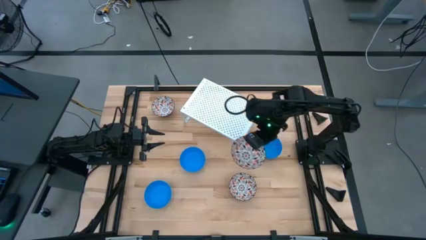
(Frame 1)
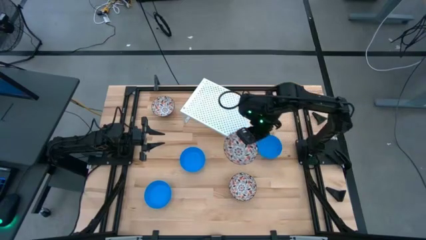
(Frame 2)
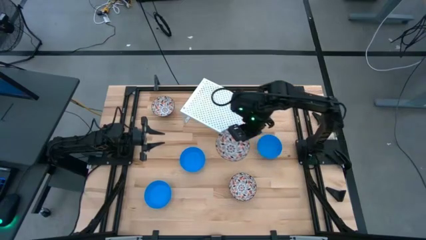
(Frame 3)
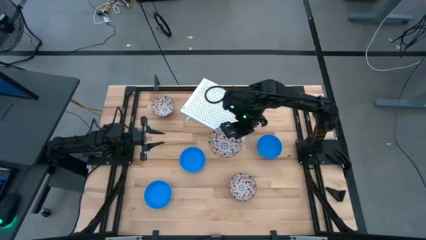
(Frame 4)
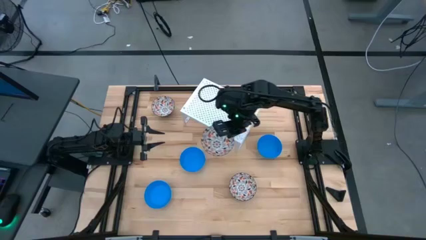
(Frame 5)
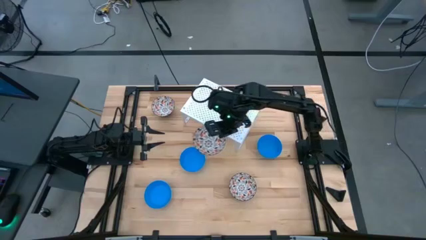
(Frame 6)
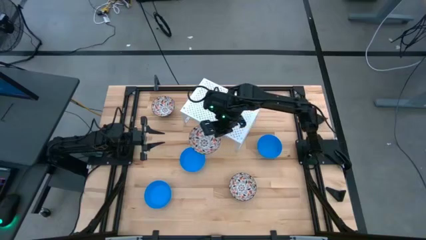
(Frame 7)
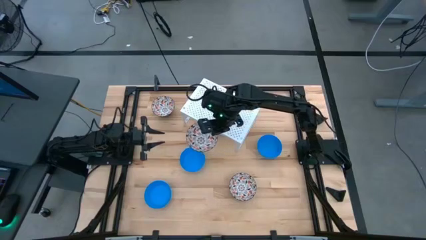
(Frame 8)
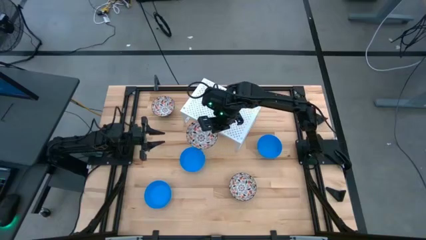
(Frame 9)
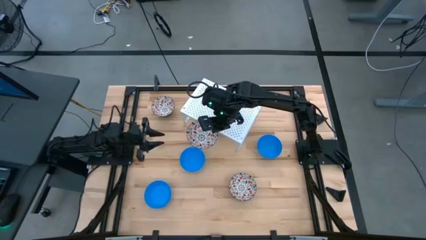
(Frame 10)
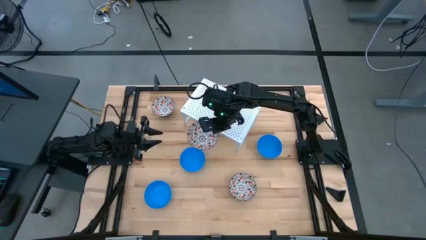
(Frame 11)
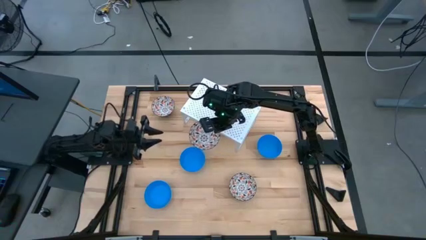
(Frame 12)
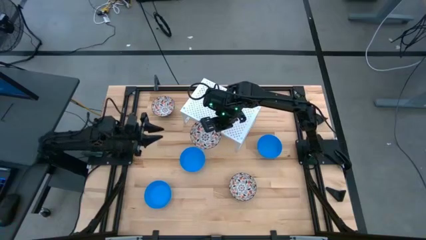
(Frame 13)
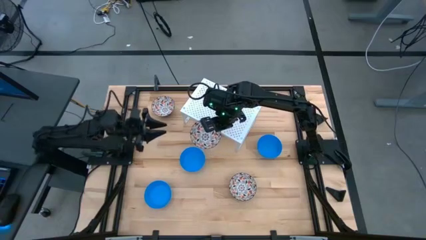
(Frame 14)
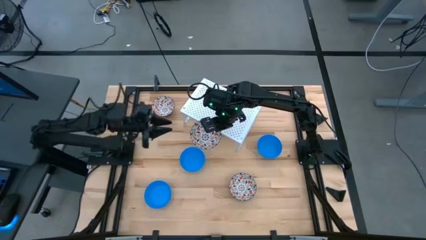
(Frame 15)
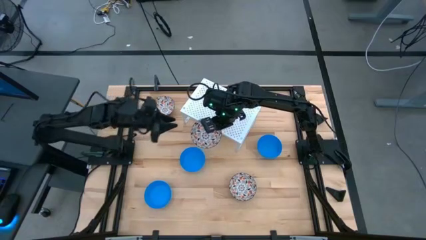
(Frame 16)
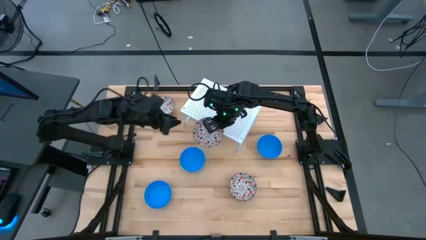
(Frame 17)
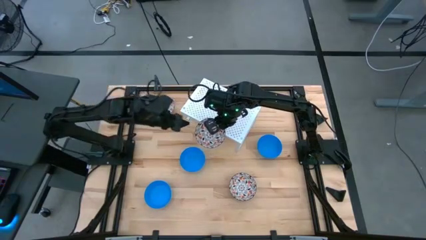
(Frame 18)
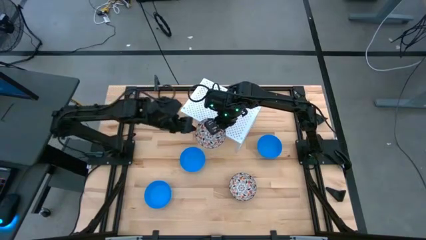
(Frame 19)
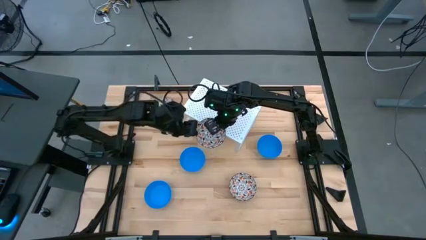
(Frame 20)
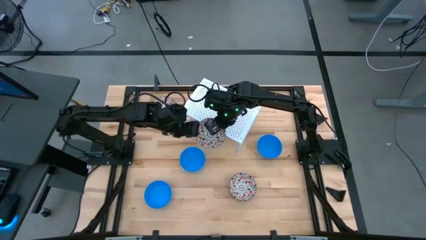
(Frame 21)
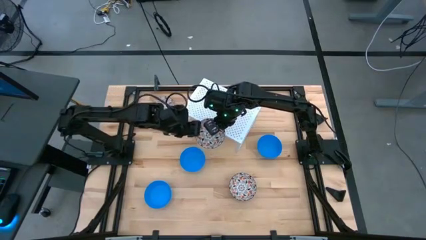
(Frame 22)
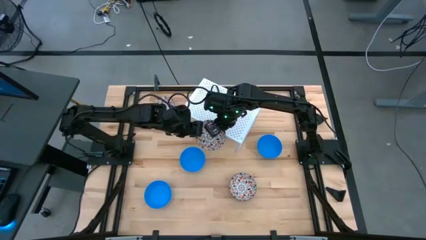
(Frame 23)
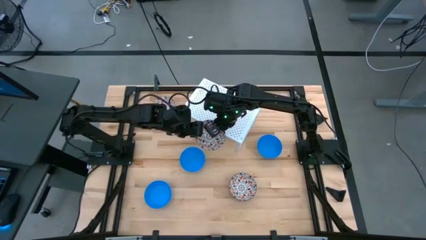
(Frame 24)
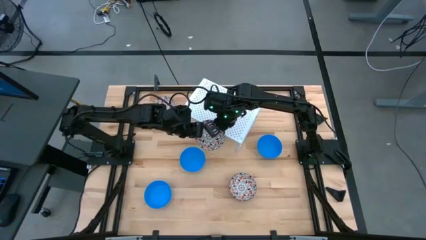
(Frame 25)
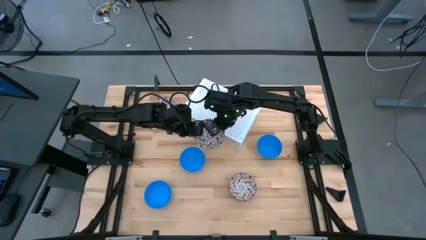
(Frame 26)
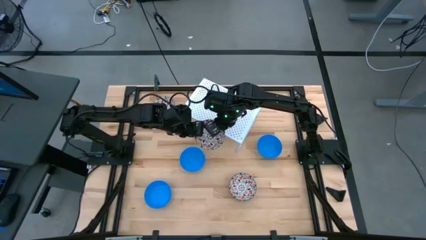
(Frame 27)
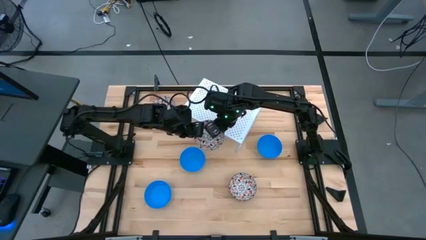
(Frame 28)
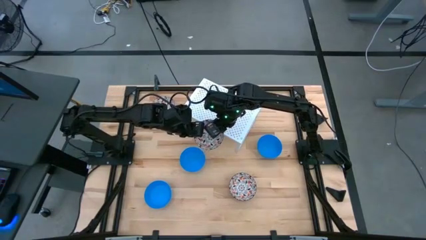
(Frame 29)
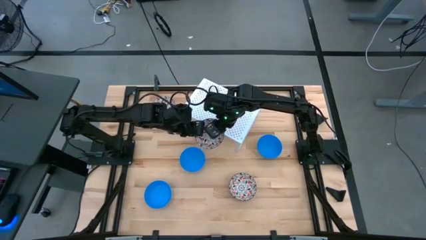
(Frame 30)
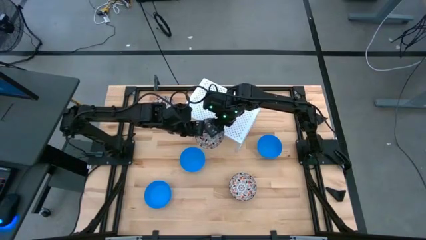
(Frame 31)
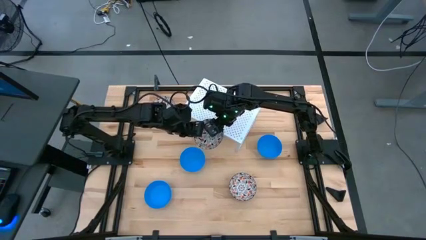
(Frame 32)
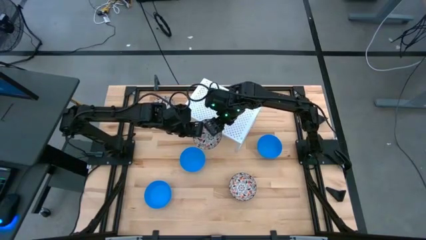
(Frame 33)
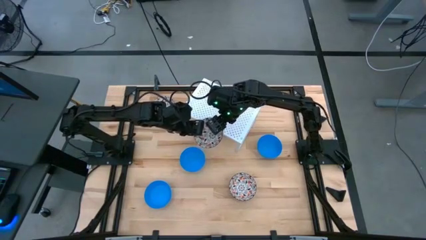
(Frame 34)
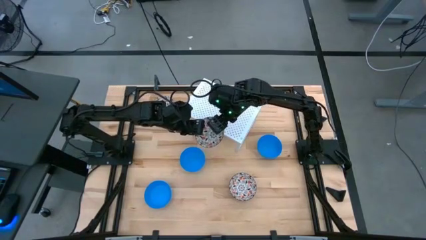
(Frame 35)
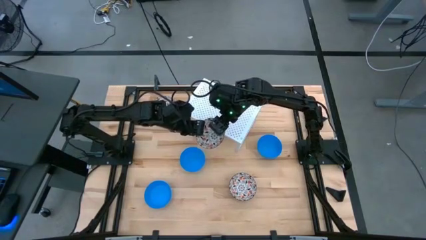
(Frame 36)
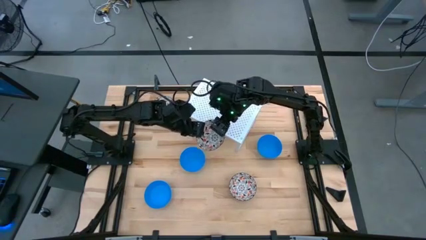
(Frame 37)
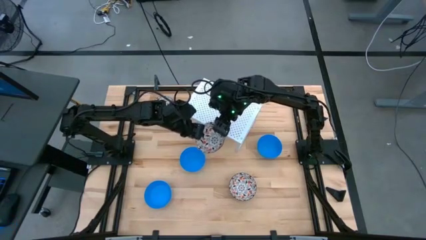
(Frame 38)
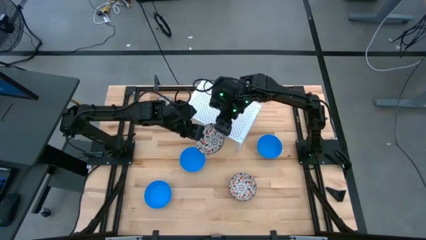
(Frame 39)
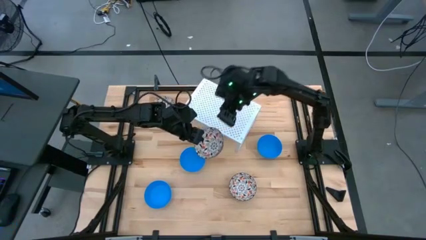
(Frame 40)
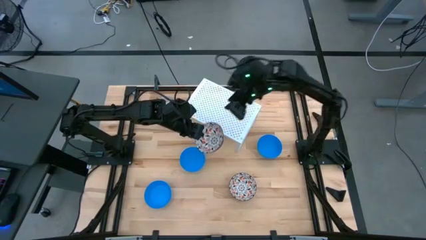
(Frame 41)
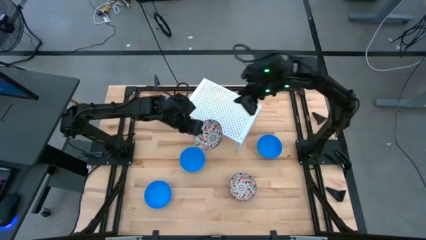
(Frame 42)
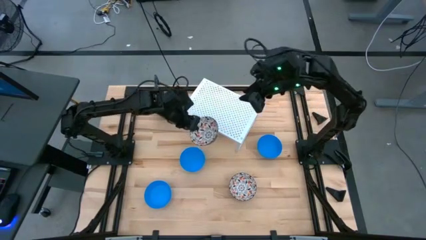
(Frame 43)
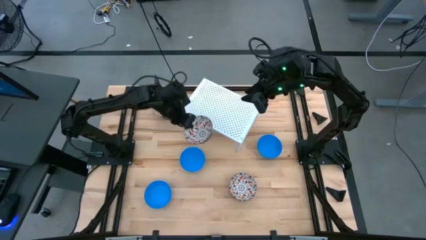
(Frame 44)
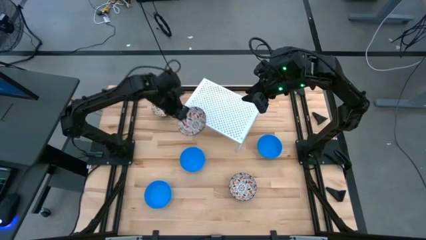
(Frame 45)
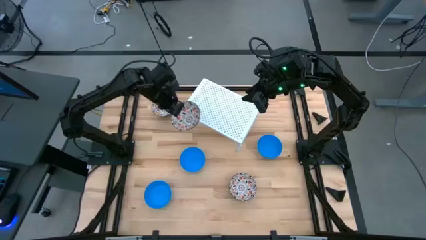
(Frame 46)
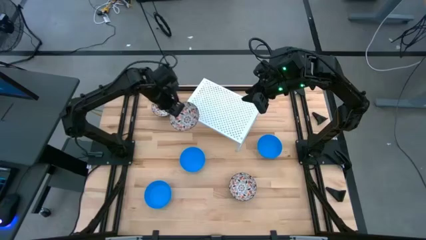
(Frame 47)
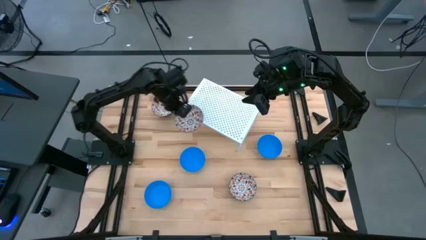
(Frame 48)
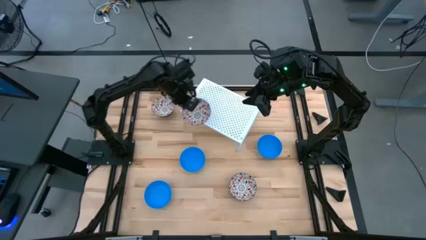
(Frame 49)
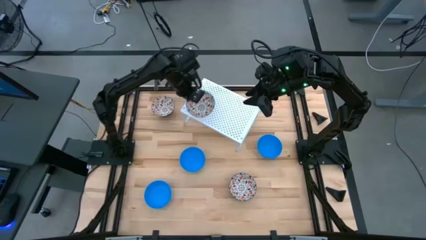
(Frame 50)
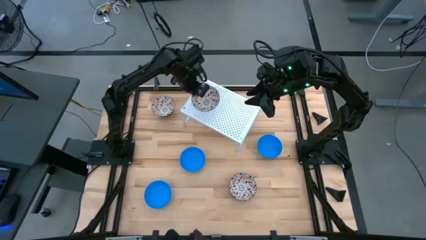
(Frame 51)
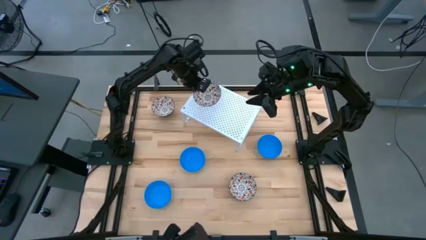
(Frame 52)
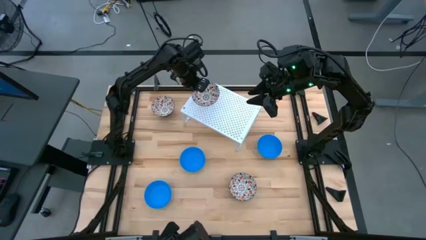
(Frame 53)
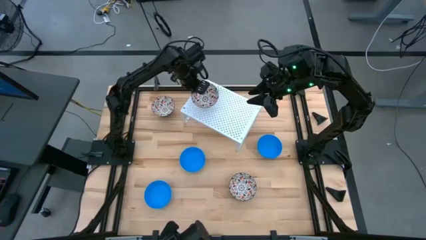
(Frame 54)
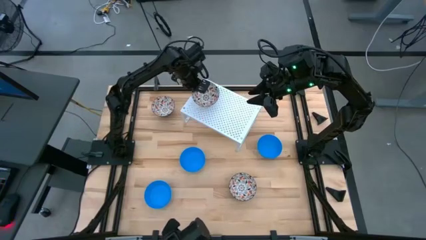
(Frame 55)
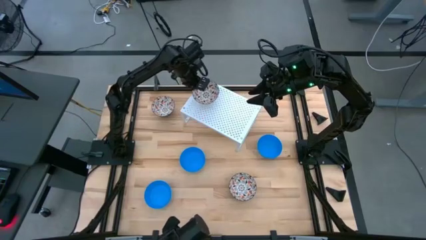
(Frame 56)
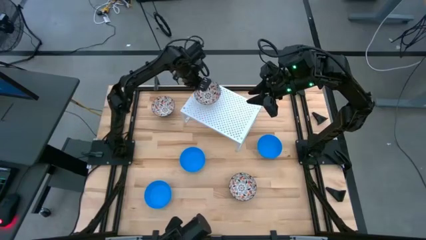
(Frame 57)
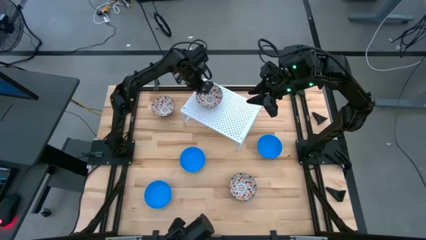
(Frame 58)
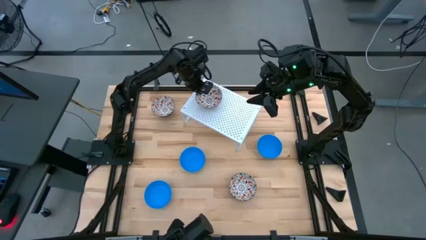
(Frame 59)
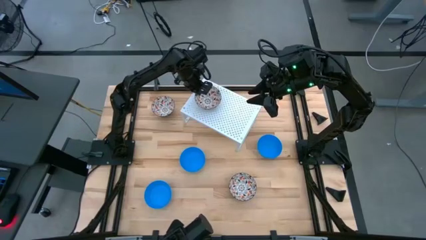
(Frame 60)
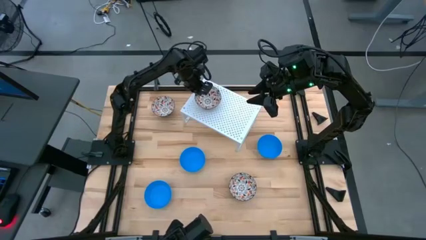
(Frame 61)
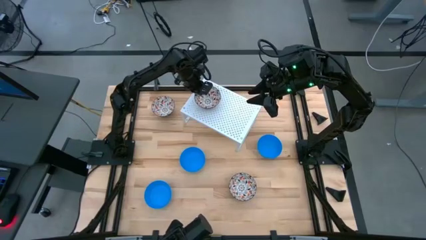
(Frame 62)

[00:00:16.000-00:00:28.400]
Task: Pick & Place Mini bowls
Put the bottom right white patterned bowl on the shelf

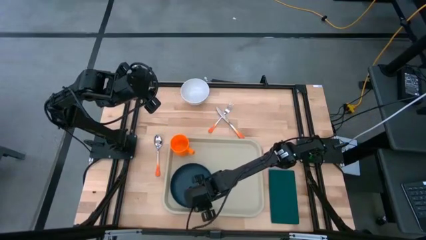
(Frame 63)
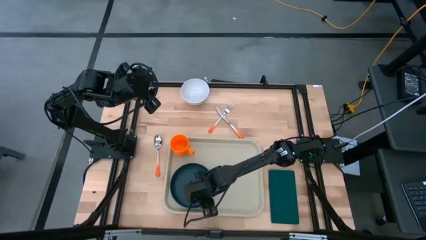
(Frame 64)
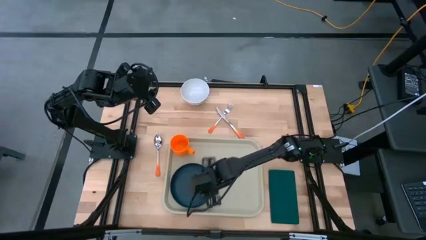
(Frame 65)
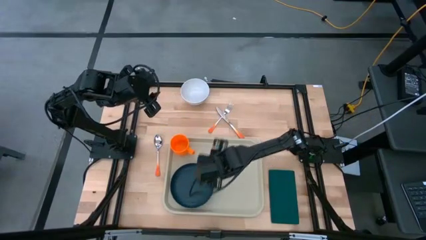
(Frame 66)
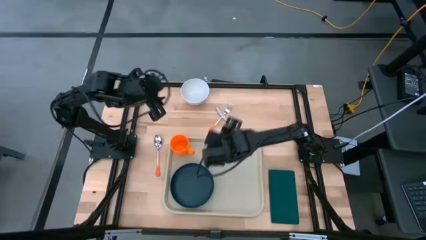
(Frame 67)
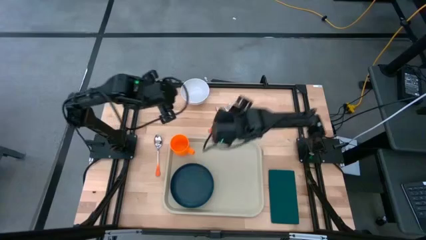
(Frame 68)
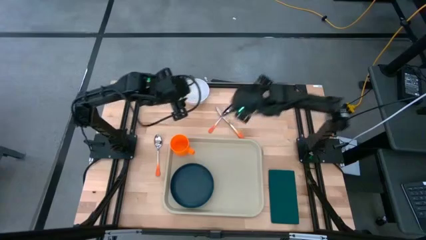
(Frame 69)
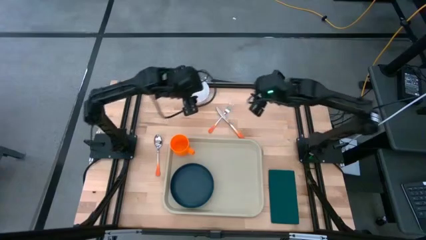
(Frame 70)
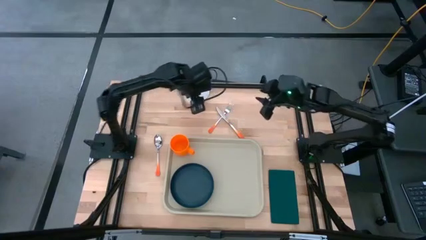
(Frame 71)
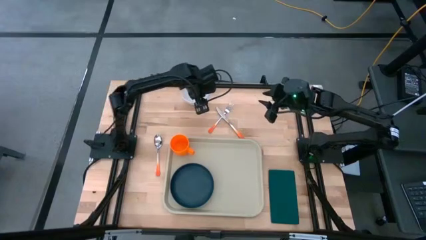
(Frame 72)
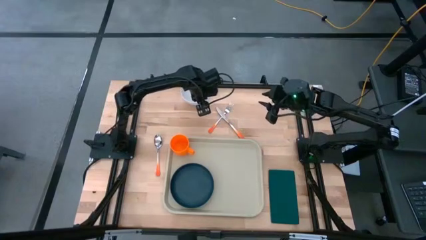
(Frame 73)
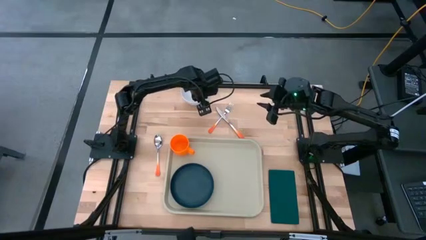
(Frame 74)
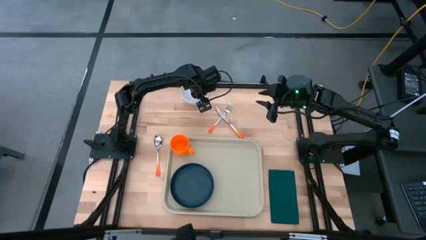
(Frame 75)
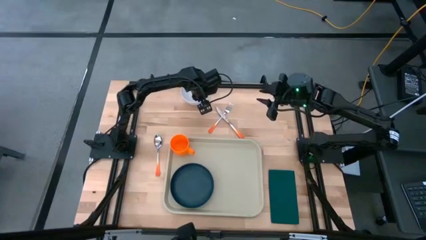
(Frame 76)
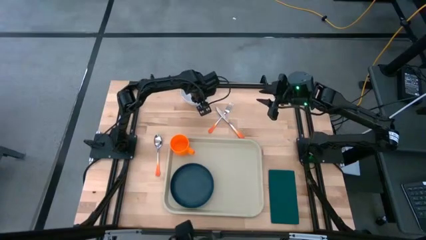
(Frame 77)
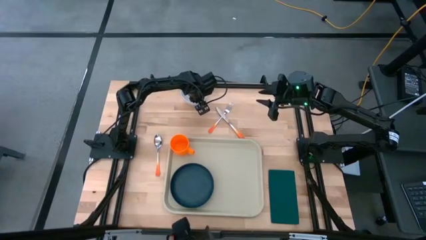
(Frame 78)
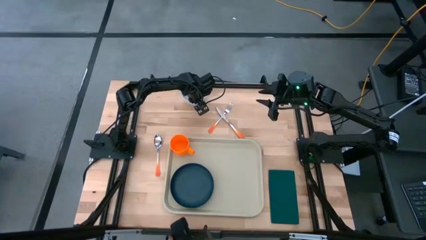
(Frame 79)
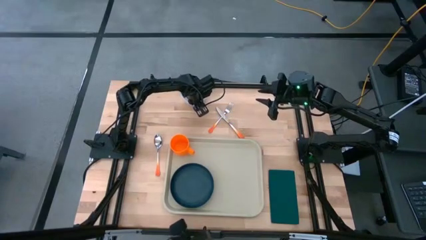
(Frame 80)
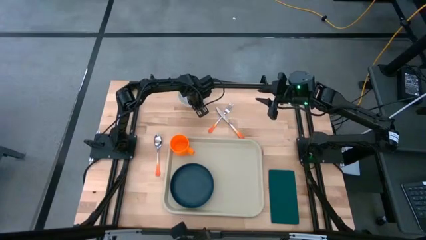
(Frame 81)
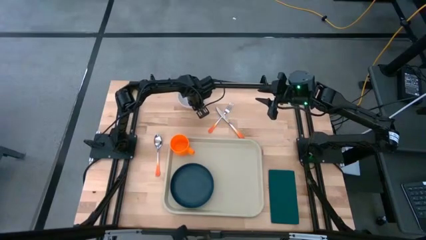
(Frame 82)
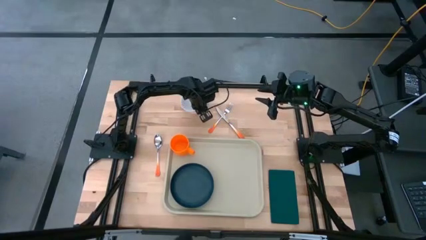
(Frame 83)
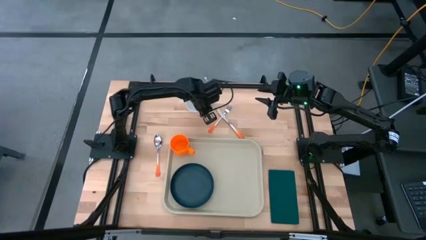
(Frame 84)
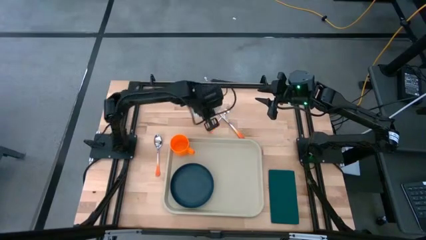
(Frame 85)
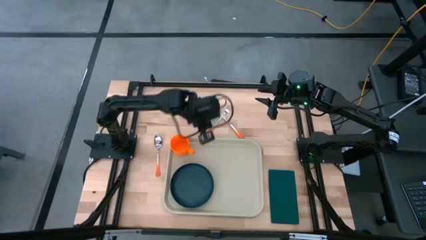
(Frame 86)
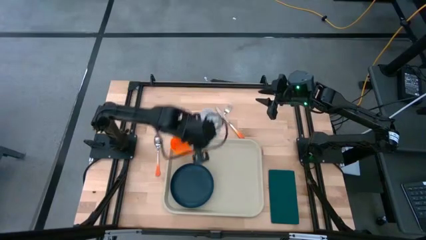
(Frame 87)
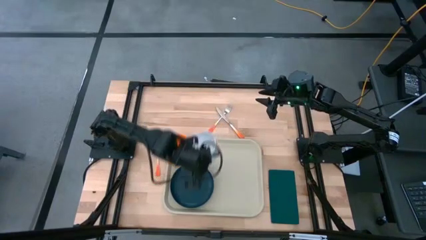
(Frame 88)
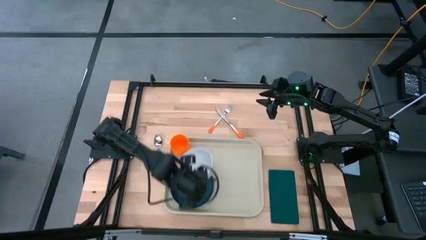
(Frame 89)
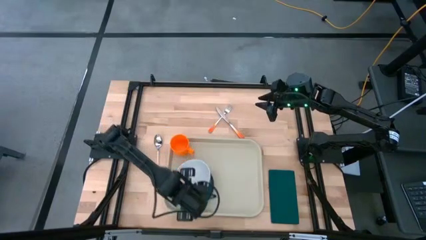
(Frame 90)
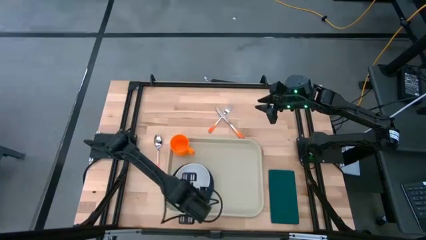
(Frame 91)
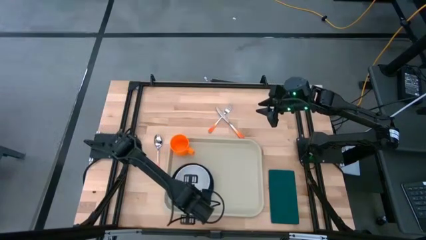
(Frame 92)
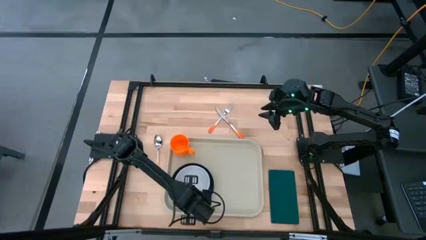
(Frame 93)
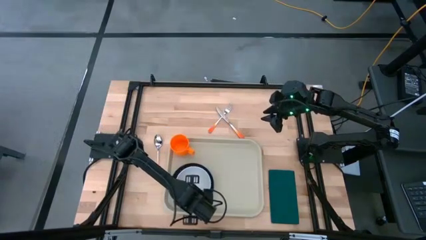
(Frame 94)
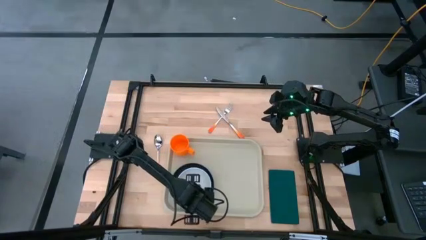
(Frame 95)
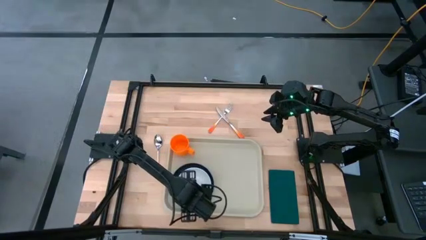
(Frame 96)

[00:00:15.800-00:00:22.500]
Task: Set up tray
Put the white bowl on the black plate
